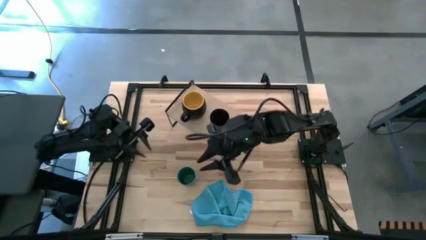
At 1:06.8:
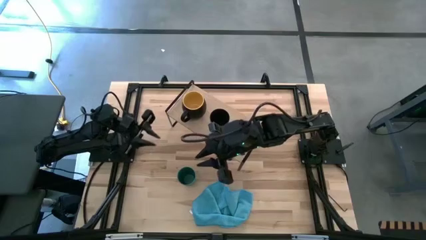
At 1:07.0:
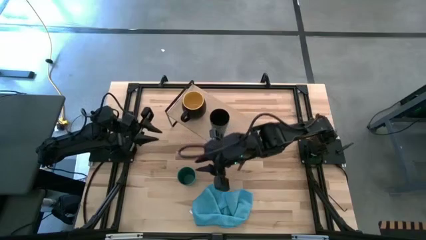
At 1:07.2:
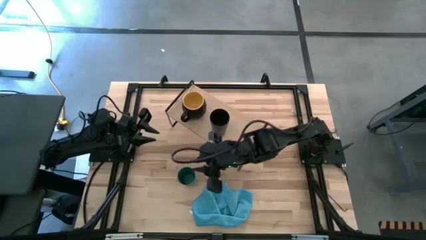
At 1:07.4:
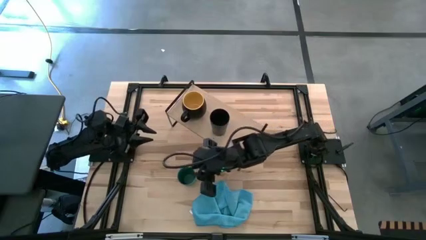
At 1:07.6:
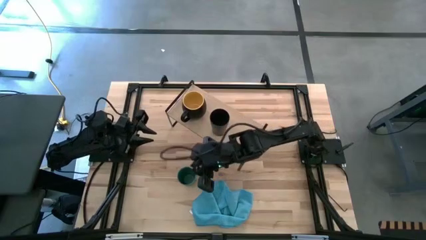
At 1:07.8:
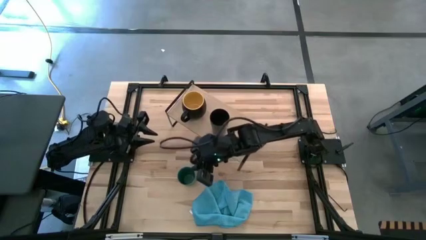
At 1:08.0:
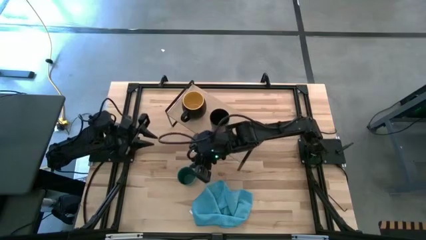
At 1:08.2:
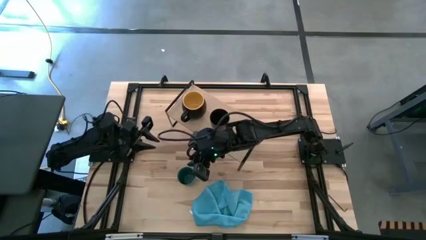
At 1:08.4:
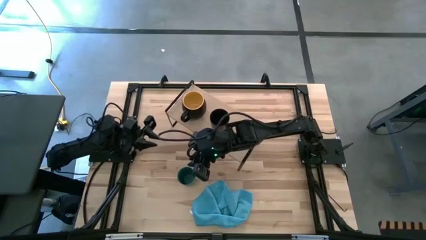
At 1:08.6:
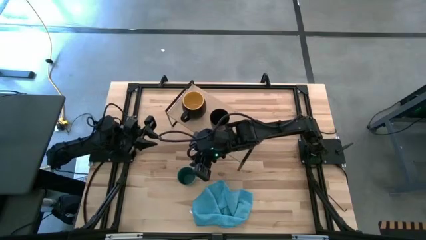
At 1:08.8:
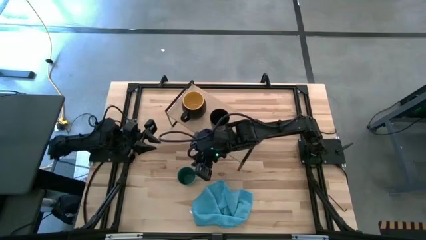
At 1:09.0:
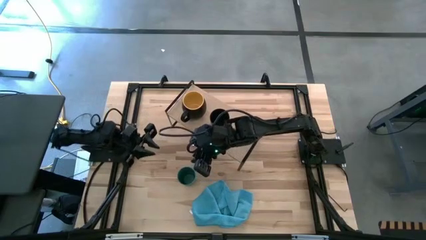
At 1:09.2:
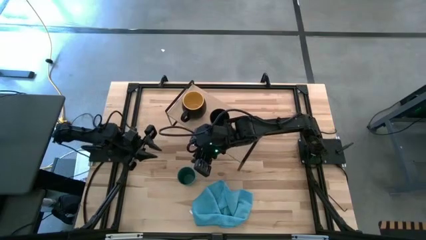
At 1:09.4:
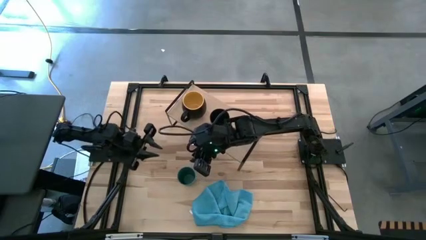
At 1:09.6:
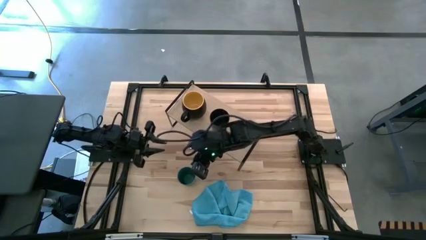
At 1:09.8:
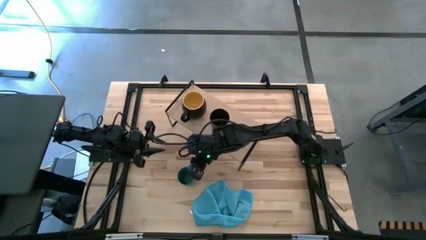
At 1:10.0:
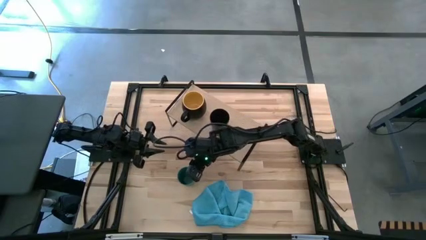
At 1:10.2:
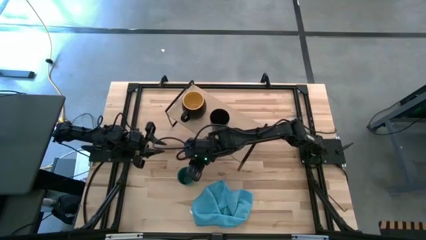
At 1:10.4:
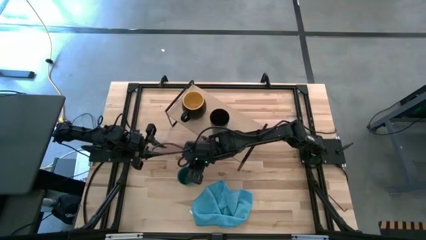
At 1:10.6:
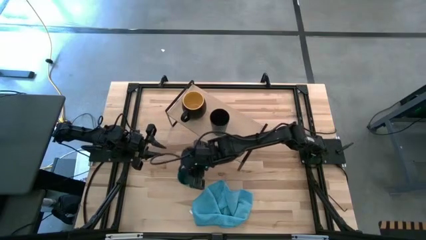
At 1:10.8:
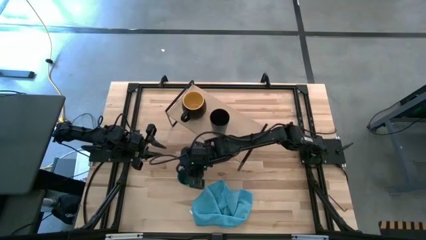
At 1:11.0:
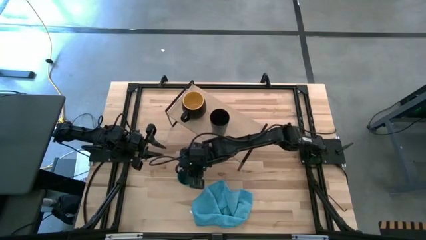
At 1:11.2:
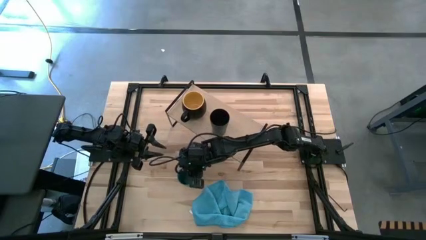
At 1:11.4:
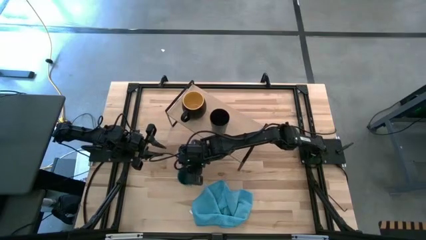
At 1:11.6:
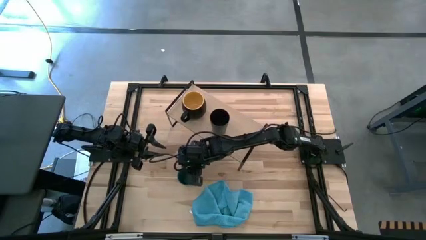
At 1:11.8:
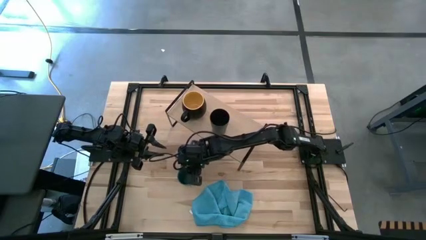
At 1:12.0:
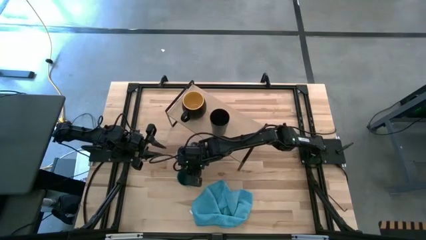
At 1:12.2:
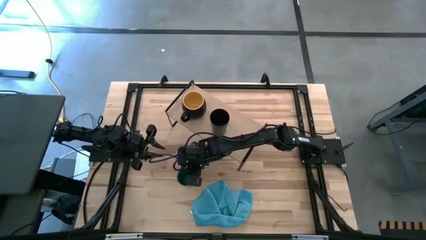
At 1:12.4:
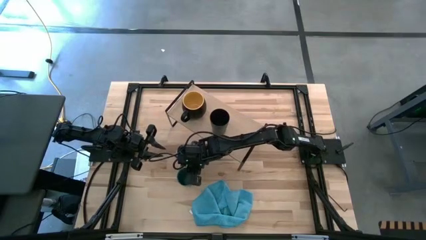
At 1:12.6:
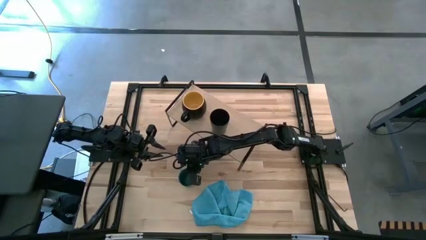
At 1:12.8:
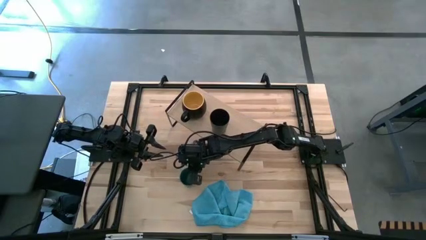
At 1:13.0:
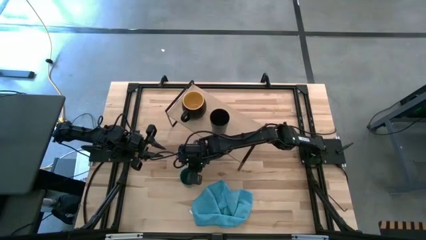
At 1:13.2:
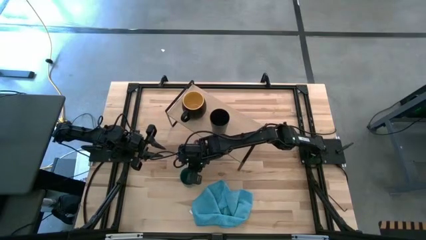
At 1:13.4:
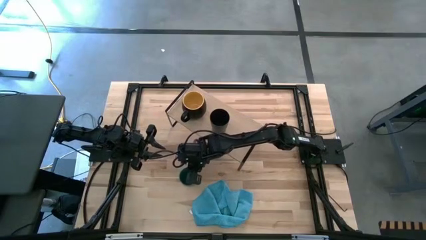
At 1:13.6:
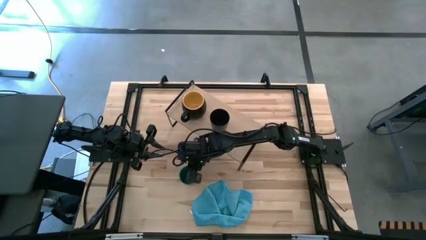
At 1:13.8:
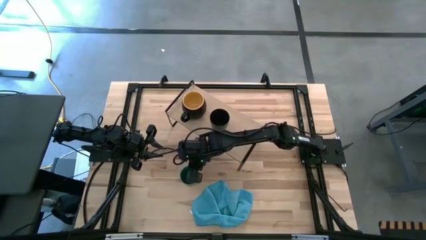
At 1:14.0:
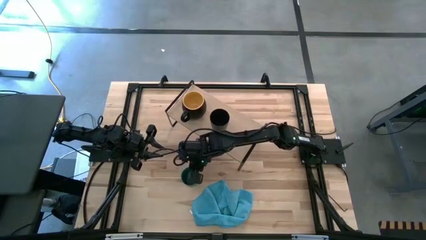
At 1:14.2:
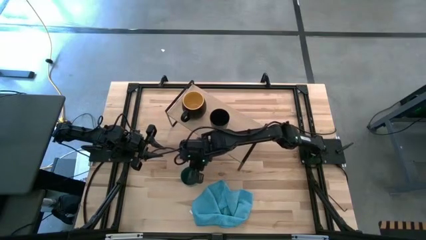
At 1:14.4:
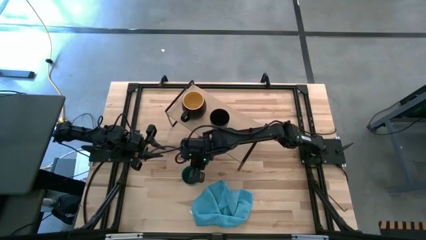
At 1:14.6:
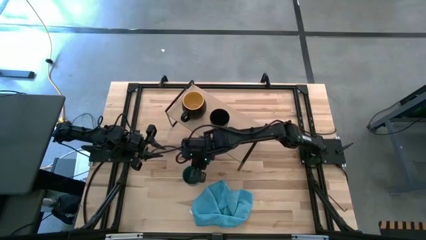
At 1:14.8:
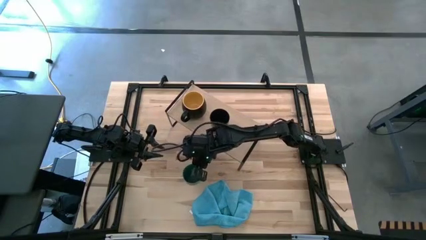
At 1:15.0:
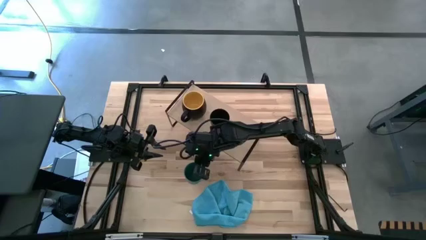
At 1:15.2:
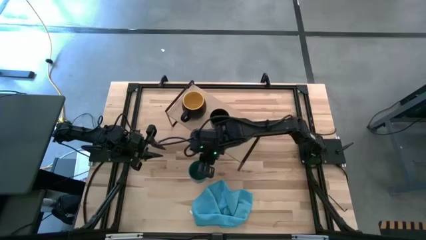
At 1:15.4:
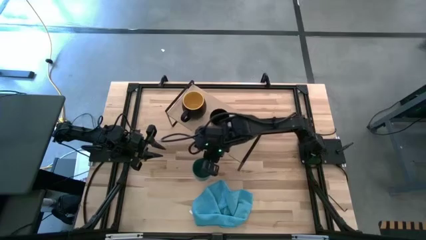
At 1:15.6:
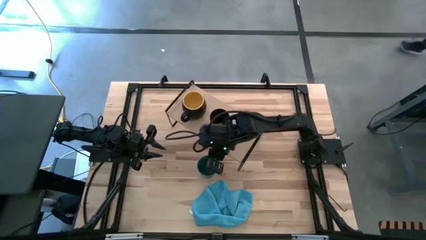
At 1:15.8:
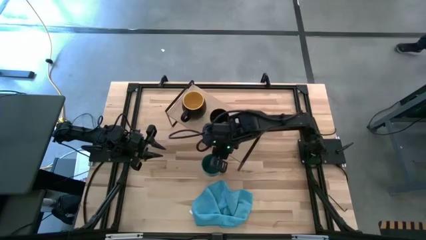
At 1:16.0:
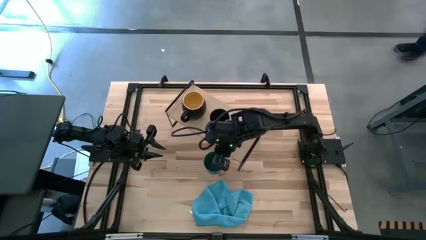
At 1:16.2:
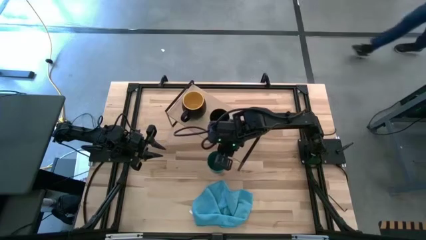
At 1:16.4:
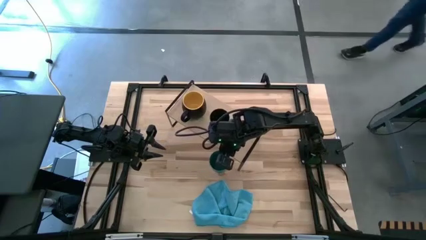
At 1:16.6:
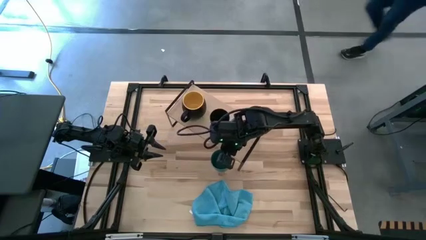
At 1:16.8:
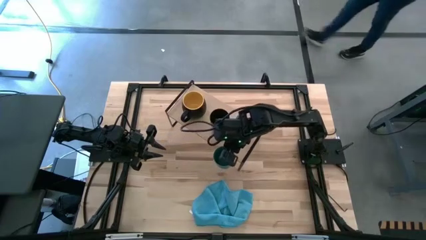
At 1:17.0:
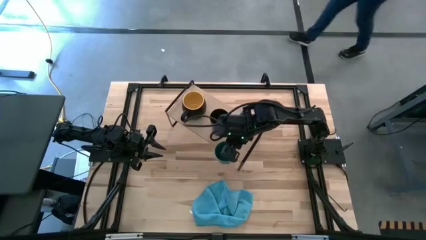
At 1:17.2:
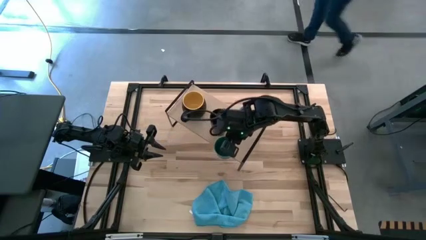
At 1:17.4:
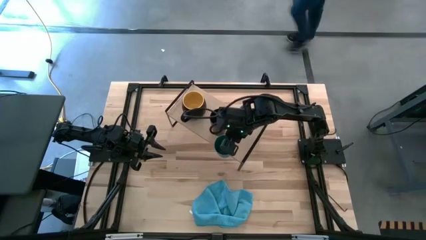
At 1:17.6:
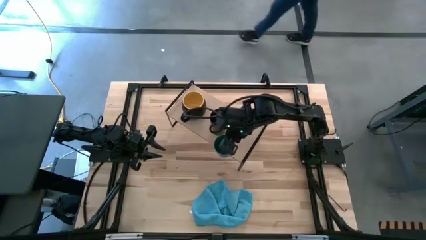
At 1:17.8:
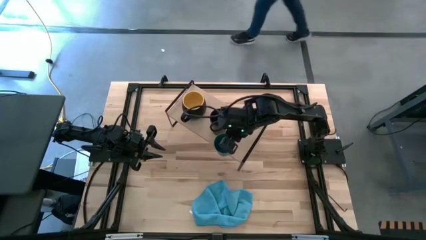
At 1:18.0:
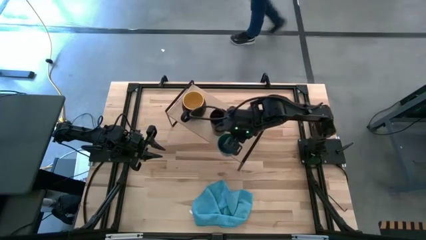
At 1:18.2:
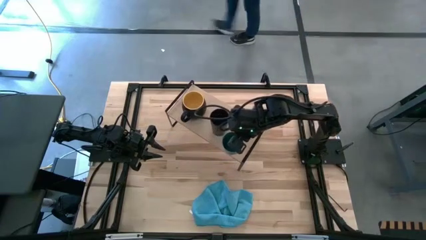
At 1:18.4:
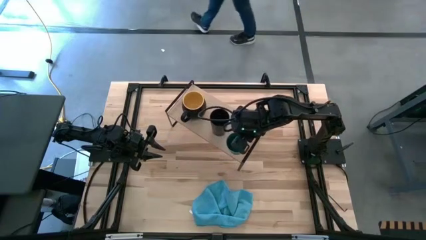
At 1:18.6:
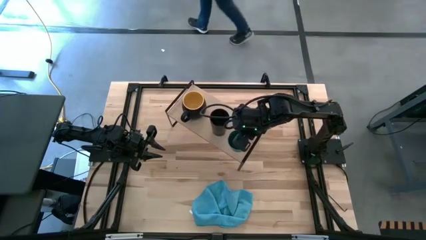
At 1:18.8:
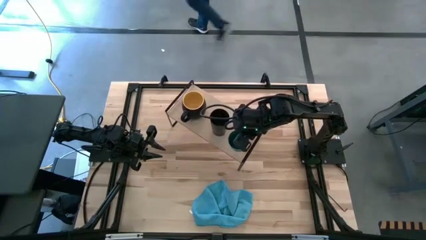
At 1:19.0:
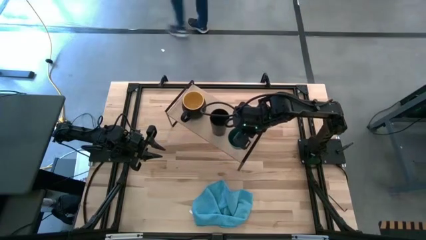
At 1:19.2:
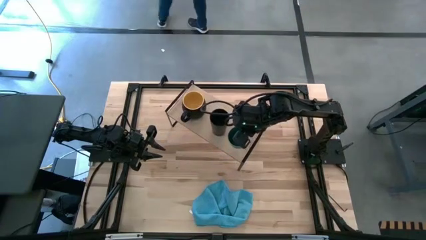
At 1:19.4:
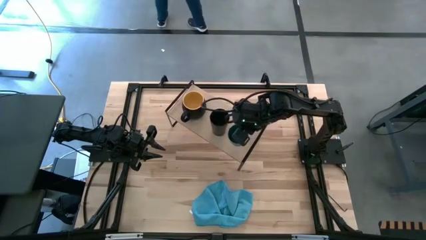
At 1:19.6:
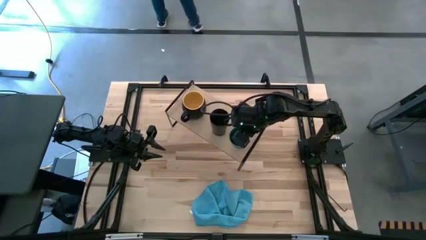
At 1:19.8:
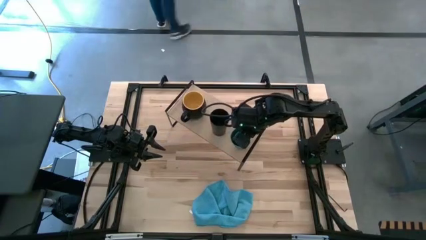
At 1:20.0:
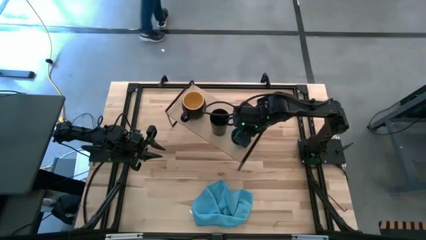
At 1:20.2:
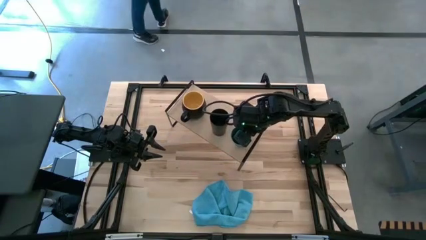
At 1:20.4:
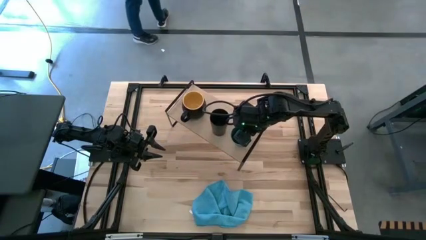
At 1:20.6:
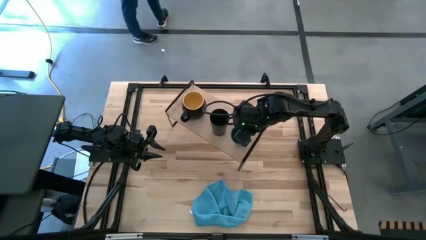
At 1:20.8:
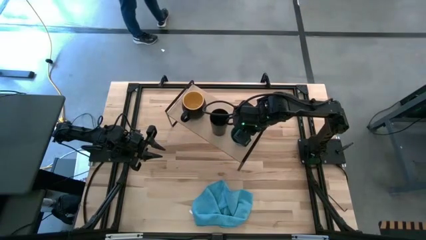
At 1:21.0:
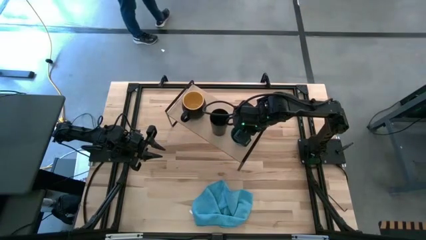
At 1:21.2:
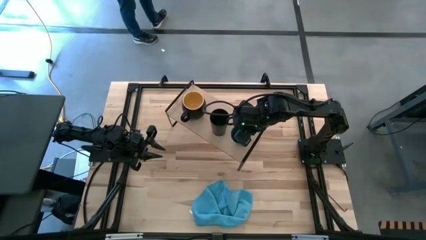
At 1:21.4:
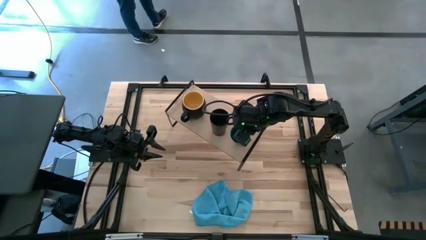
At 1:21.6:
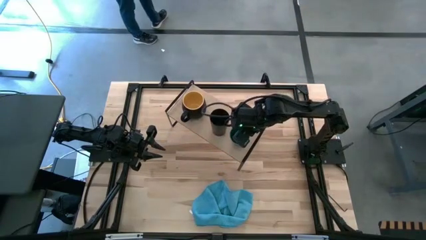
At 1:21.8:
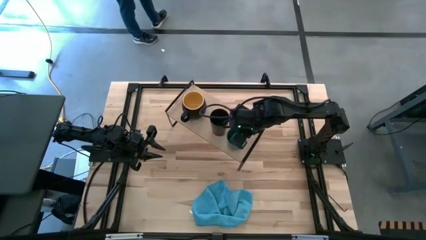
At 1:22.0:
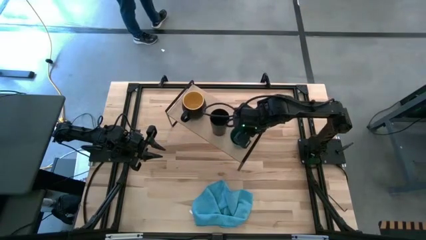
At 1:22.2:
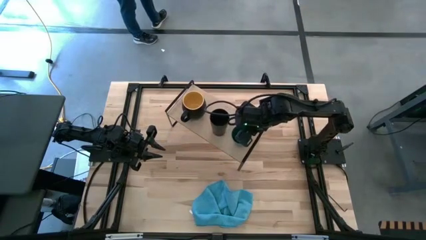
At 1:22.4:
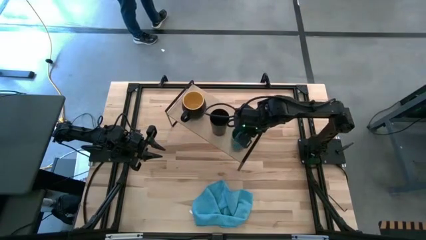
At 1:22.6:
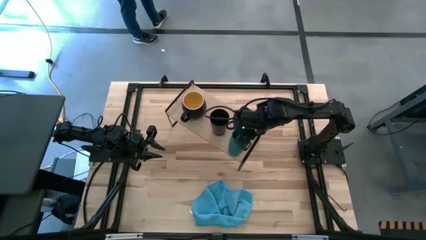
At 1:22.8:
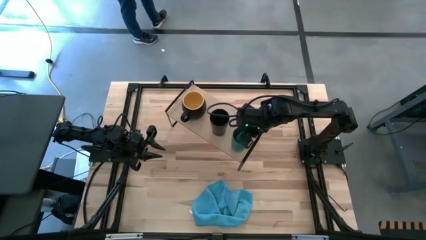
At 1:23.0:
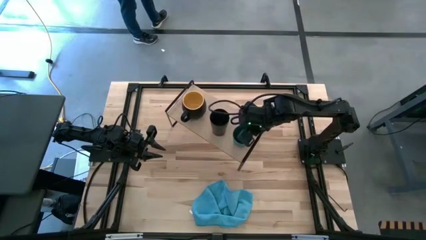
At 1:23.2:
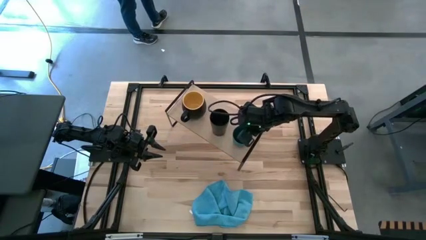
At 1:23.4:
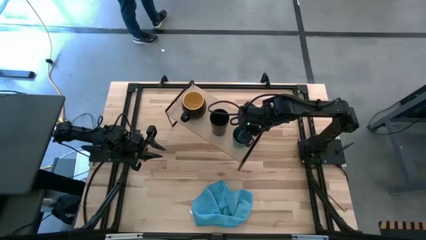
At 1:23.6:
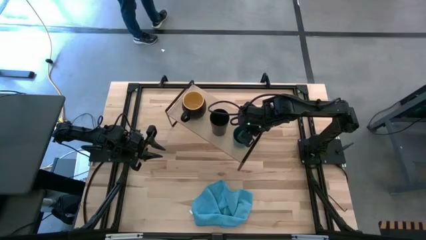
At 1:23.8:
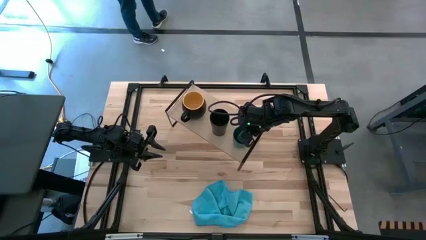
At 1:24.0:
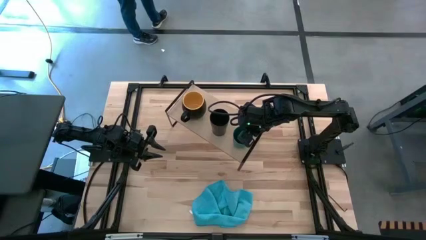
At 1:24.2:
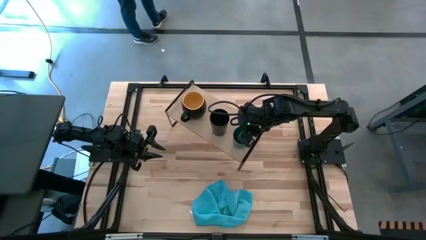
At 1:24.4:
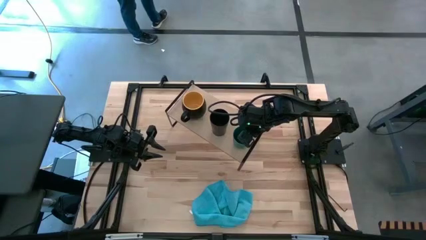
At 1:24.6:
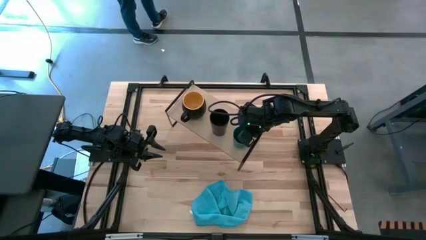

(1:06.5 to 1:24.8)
Task: Stack small to large cups/mugs on shelf
Put the green cup on the shelf
